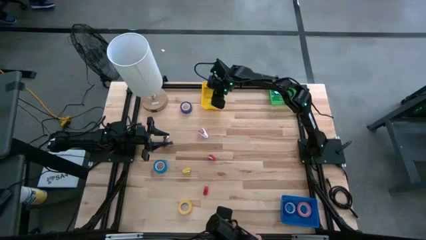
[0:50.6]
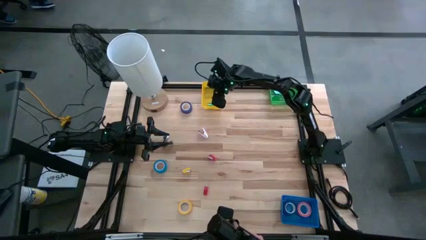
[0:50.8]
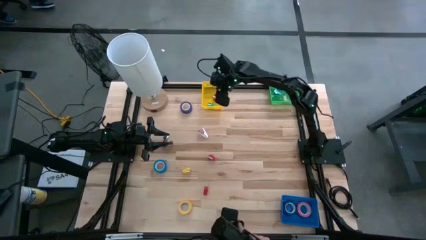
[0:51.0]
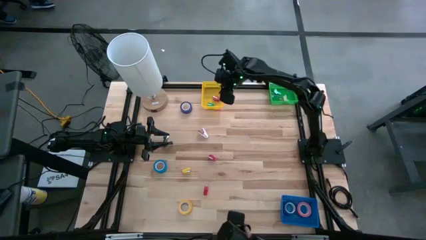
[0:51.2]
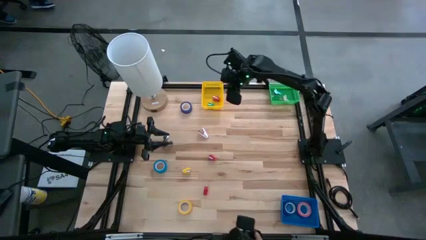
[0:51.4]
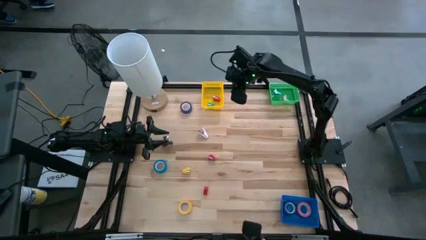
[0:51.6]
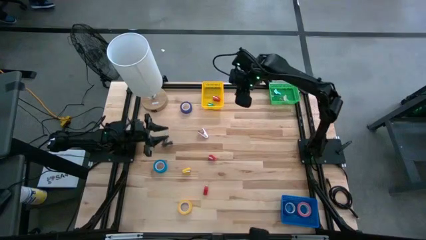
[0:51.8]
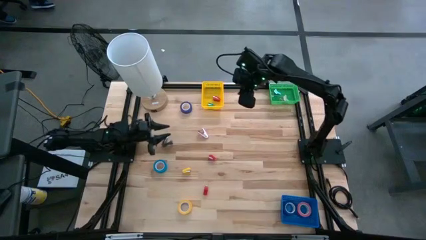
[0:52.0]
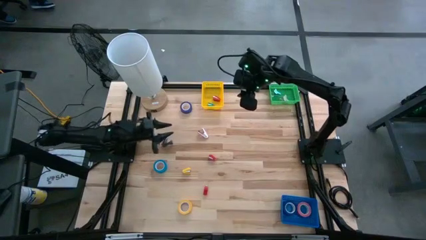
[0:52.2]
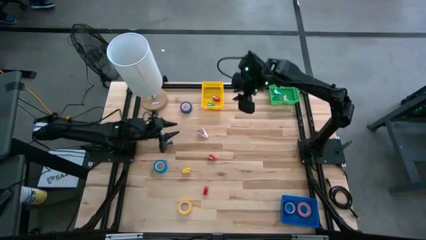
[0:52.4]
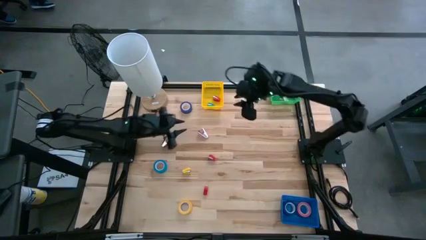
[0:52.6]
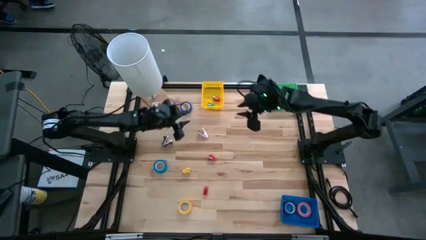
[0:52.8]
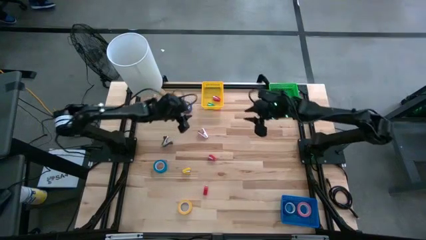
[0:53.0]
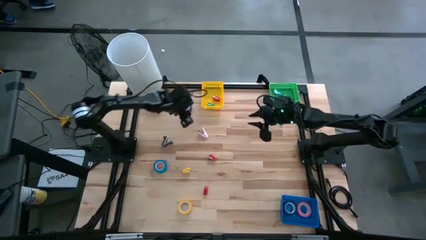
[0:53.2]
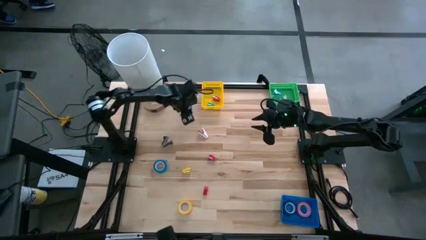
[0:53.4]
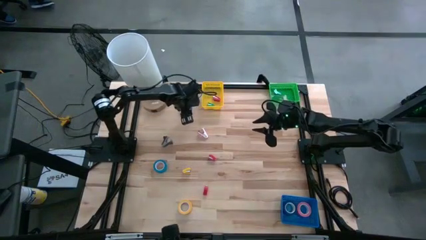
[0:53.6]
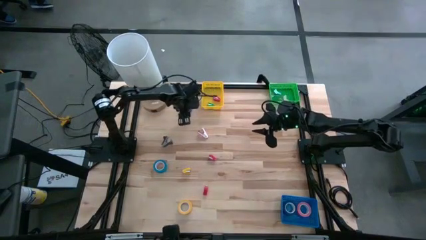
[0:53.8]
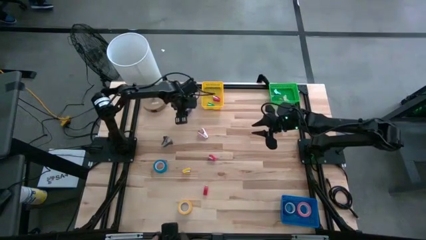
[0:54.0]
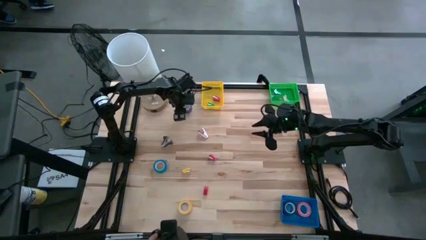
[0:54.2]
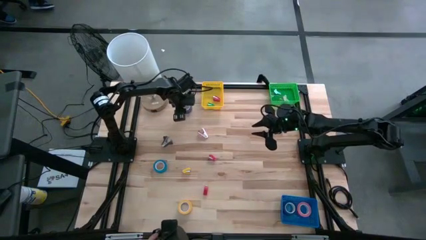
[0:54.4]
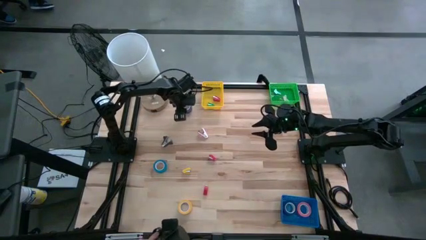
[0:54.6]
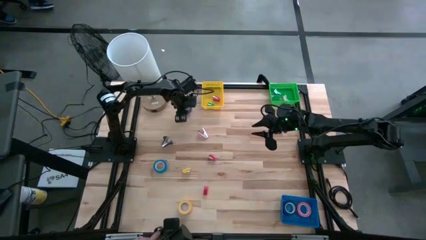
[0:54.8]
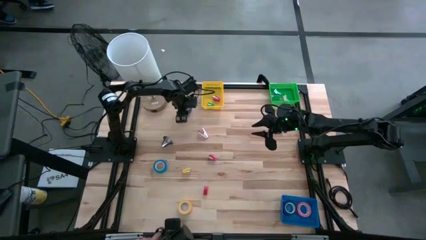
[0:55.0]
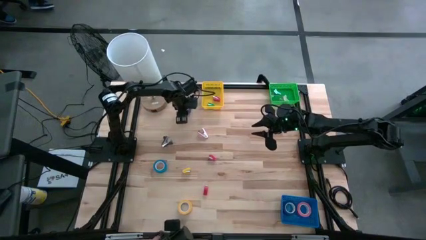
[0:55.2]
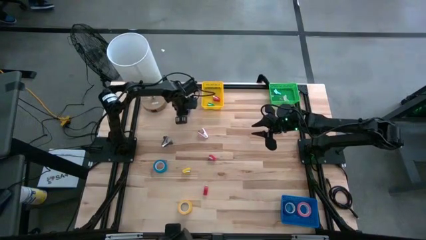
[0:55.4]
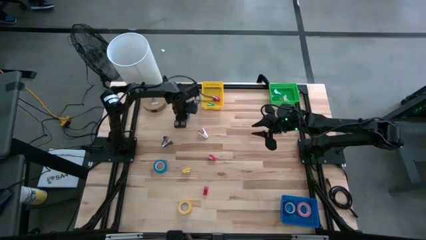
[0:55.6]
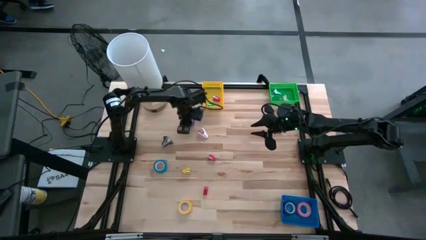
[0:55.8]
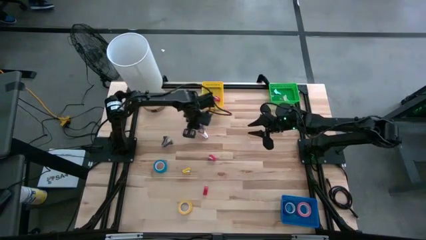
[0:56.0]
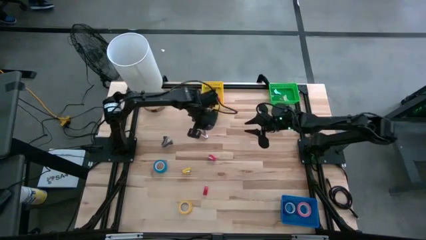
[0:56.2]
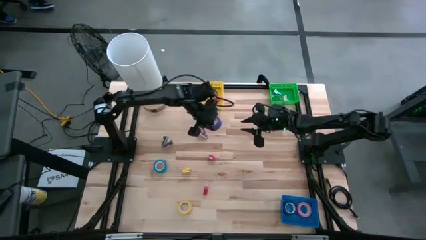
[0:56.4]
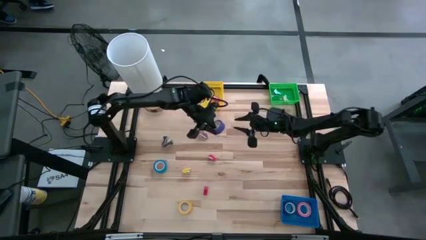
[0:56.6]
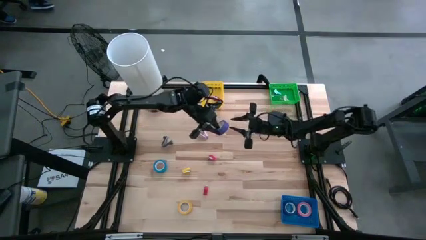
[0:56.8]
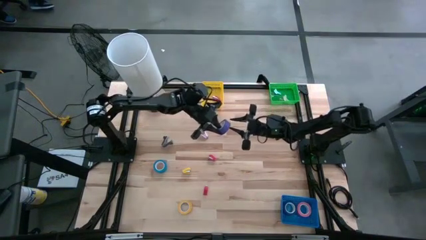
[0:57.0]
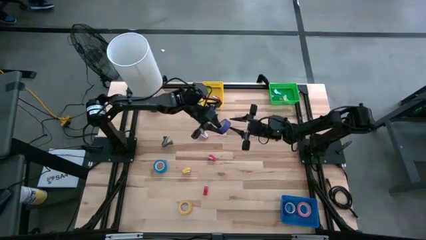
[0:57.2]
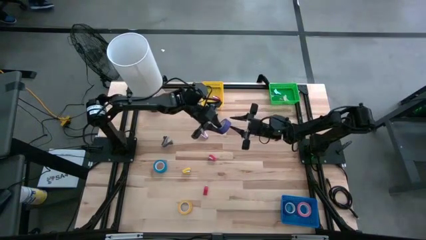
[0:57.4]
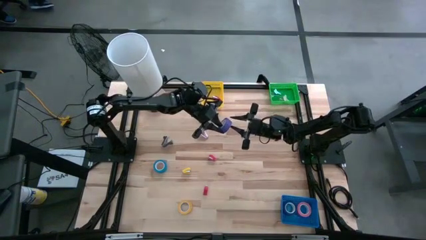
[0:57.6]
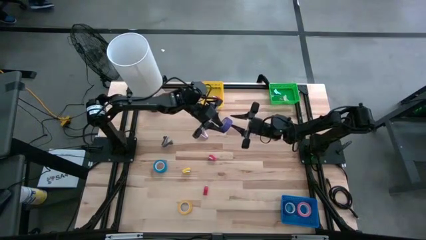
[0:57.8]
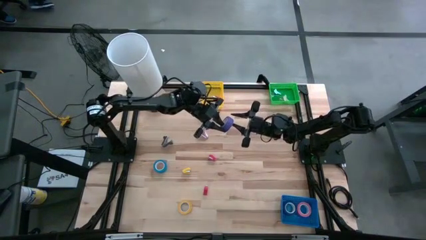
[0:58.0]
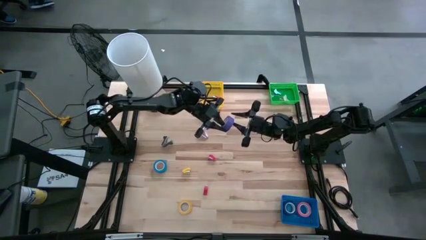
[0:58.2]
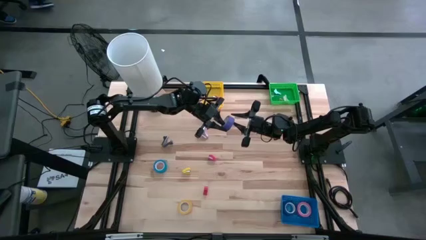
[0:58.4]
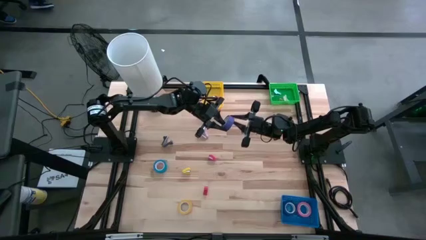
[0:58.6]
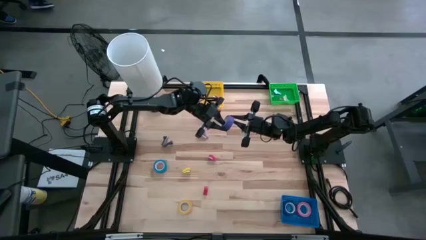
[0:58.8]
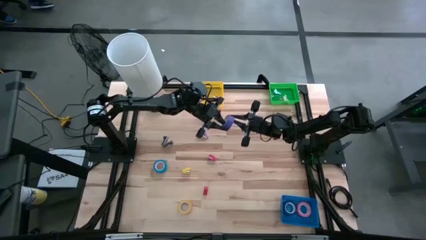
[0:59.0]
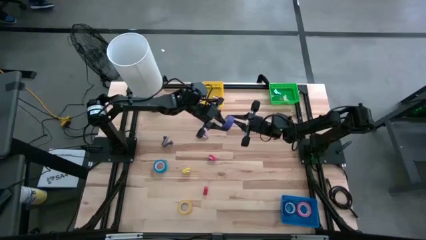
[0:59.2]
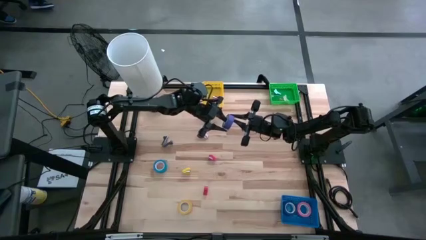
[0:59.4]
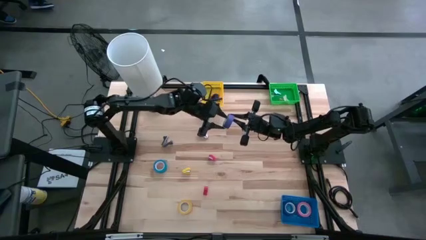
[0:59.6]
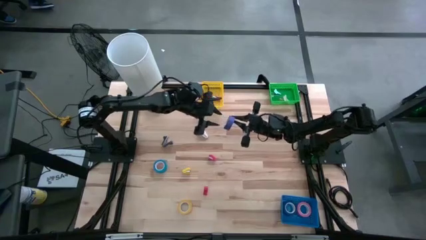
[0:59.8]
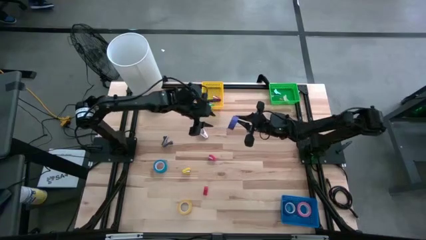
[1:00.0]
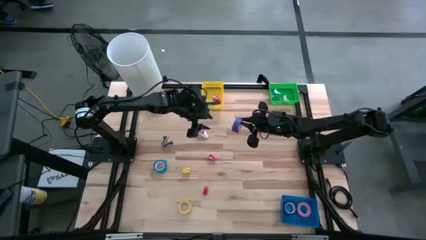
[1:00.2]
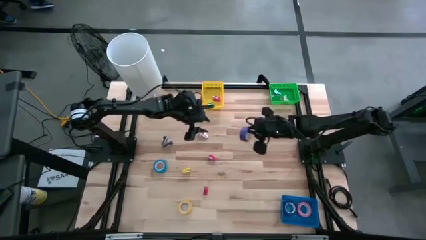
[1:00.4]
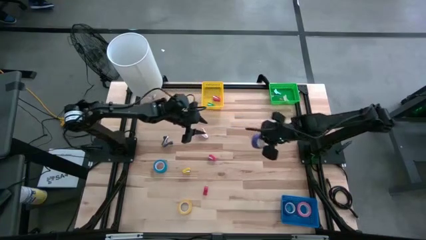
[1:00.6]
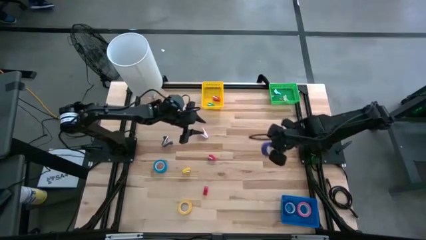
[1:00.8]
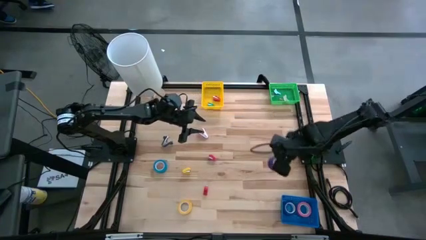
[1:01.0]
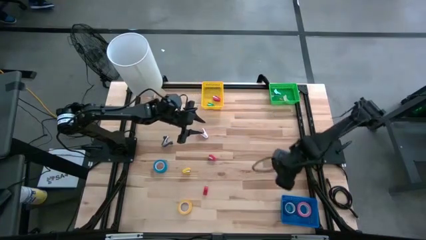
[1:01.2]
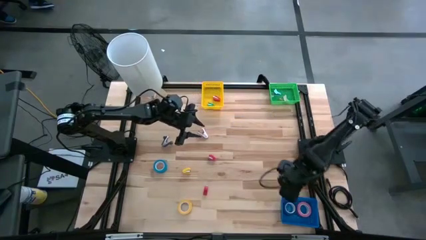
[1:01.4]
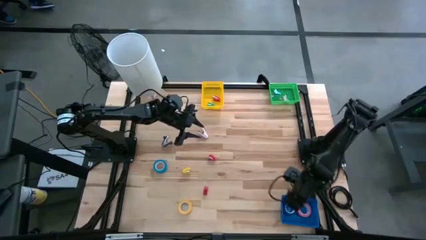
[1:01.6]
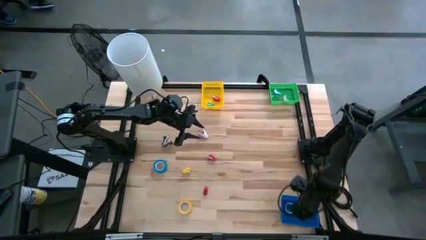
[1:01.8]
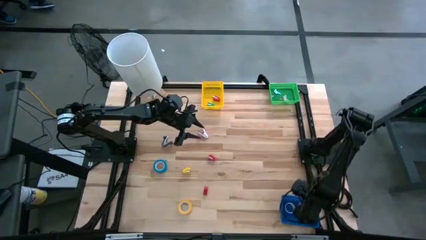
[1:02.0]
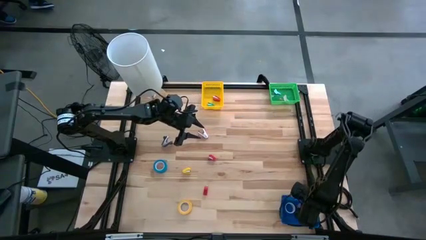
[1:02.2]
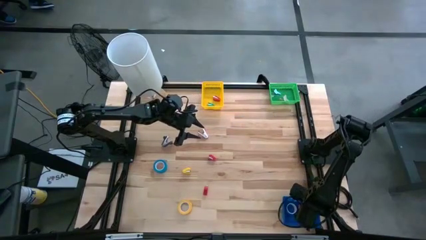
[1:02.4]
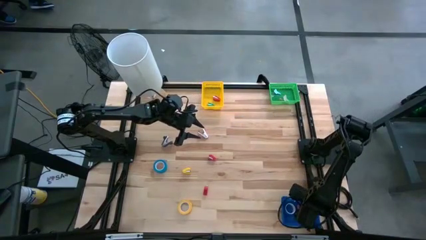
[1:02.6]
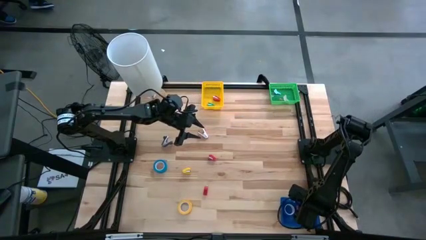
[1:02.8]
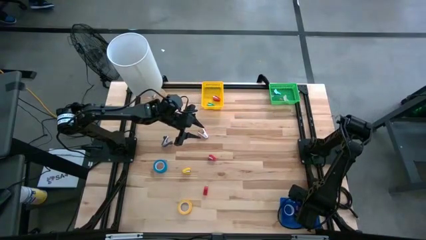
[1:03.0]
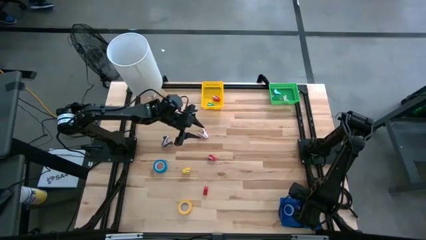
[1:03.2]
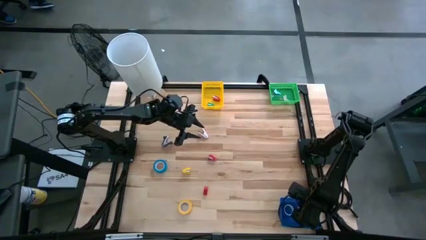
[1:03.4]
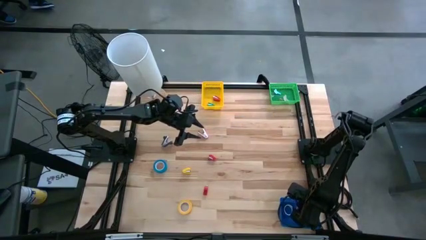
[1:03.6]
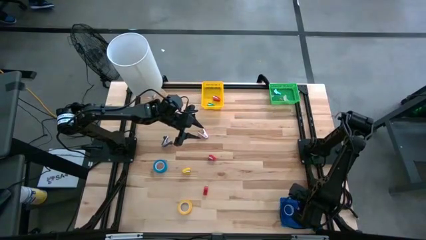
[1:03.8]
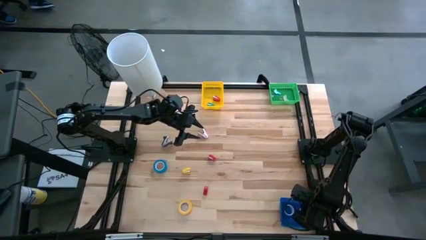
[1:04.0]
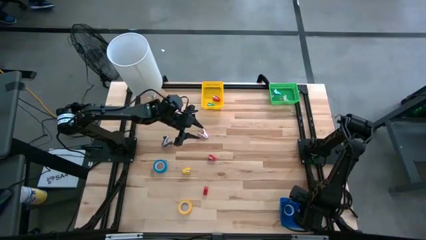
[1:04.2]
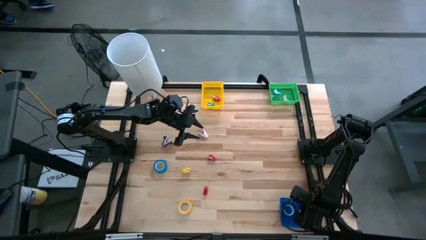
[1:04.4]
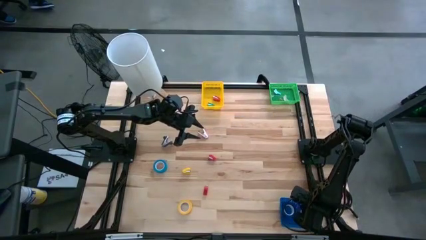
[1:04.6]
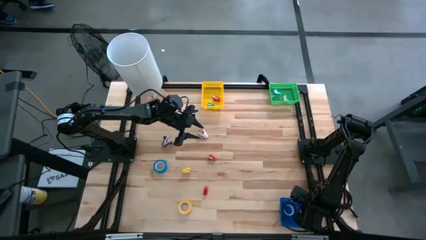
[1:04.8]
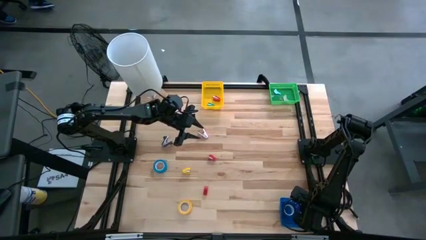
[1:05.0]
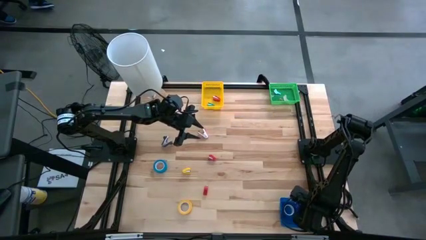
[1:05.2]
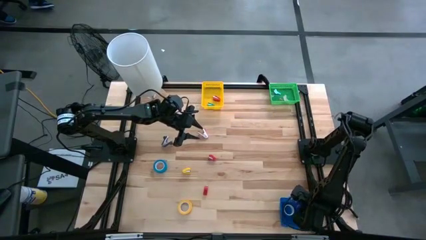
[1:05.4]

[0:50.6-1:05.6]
Task: Pick and place Stapler, Stapler remover, tape
Put the blue tape into the blue bin

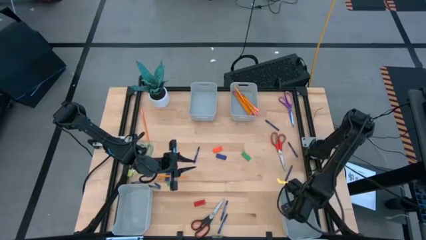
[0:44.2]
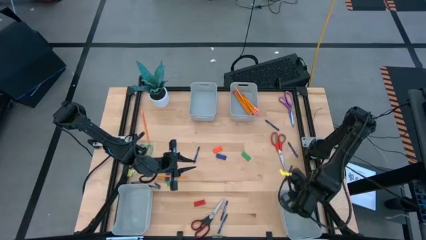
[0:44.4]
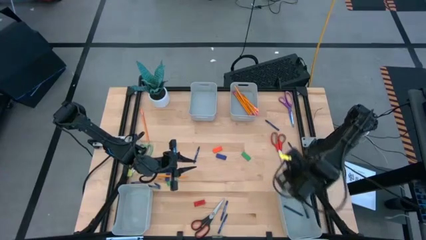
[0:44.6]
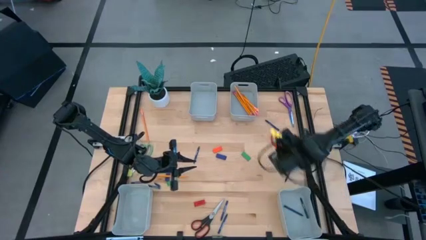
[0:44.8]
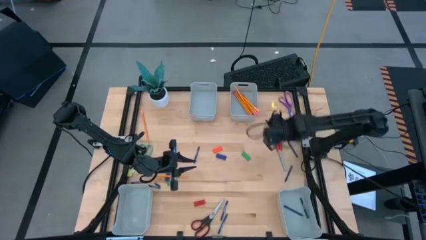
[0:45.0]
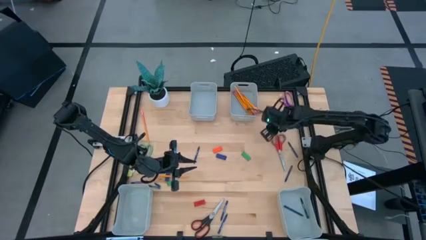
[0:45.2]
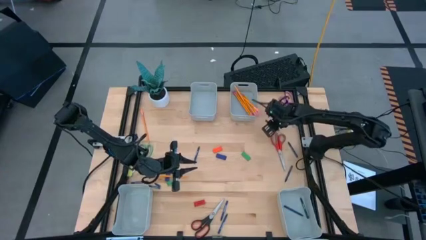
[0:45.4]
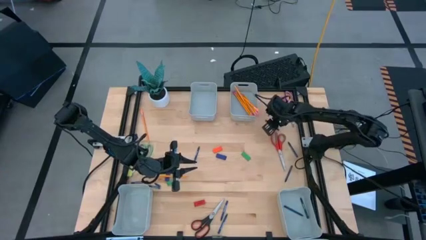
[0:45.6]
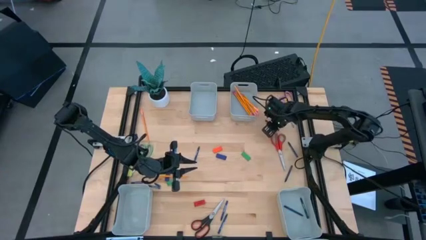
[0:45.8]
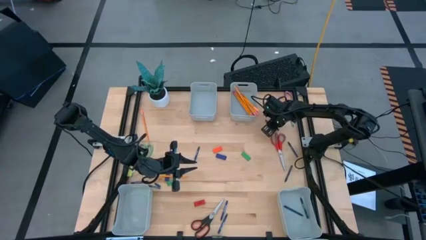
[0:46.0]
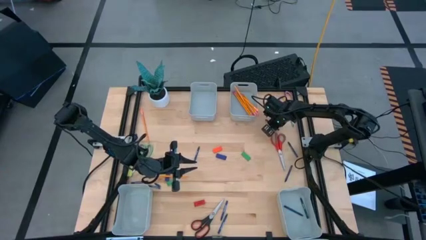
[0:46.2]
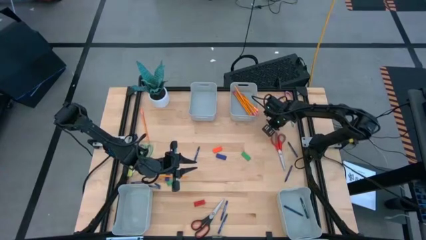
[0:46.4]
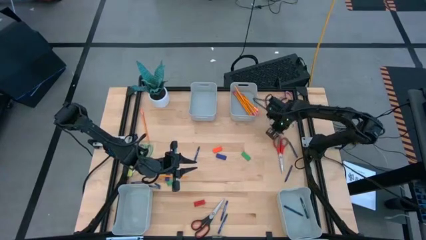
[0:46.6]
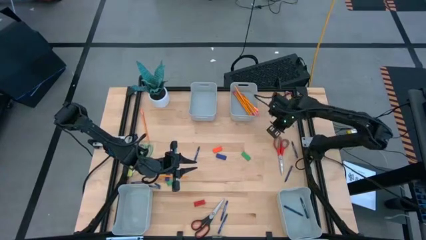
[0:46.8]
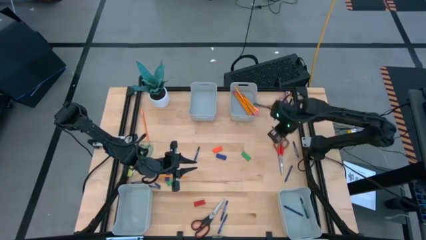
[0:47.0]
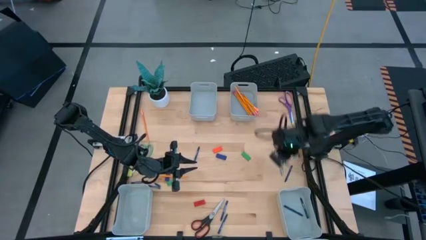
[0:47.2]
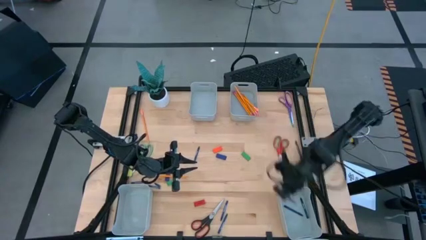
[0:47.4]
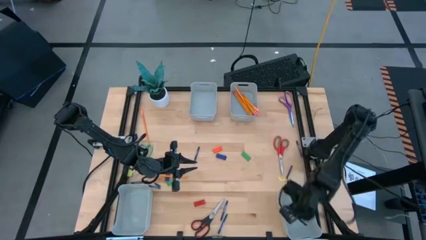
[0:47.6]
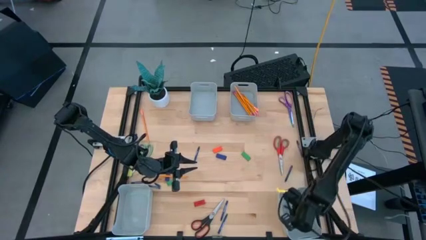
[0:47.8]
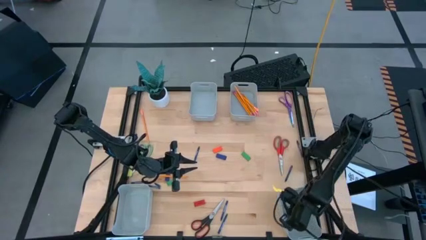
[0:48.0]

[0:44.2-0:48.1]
Task: Sort crayons/erasers/pens/pencils in bins
Put the blue crayon into the bottom right bin
